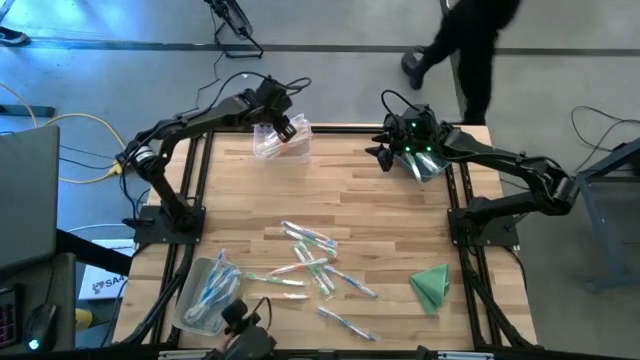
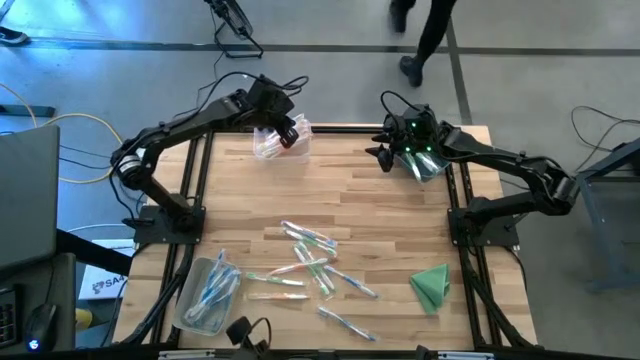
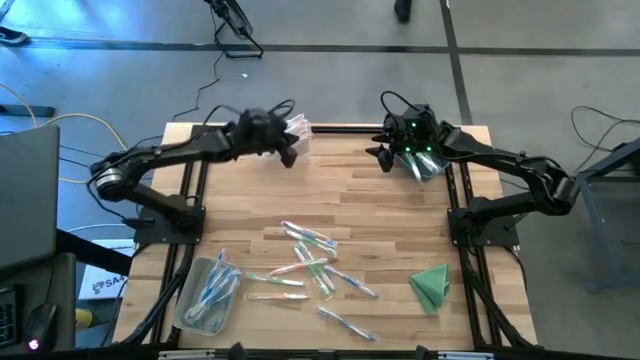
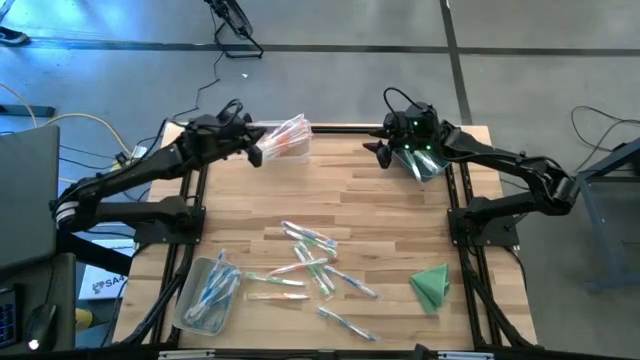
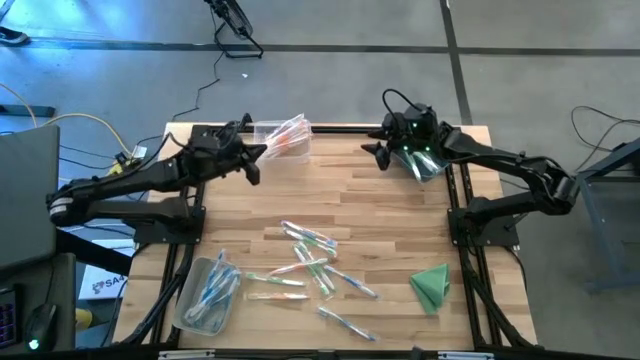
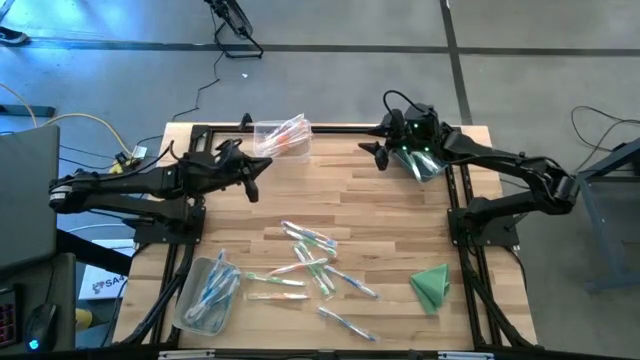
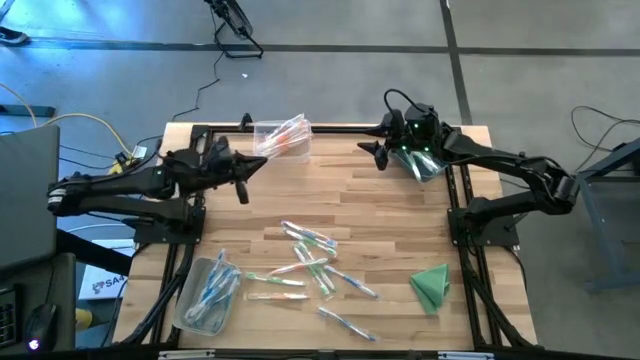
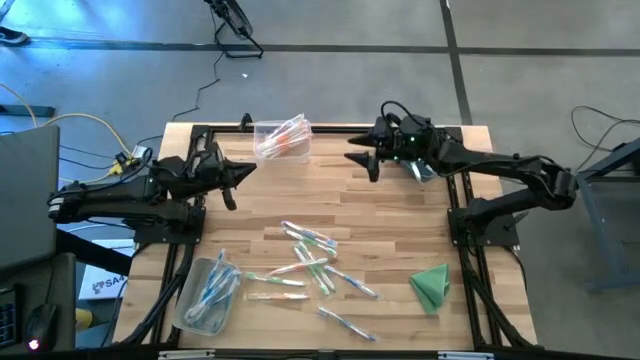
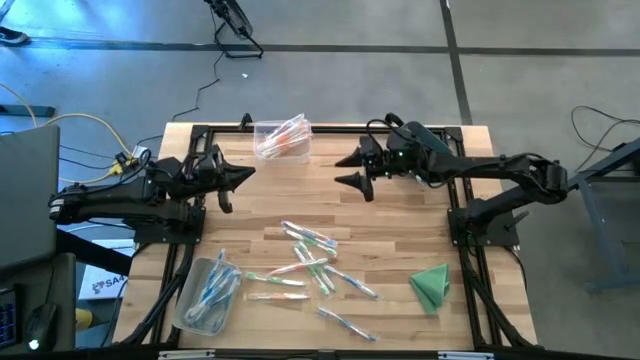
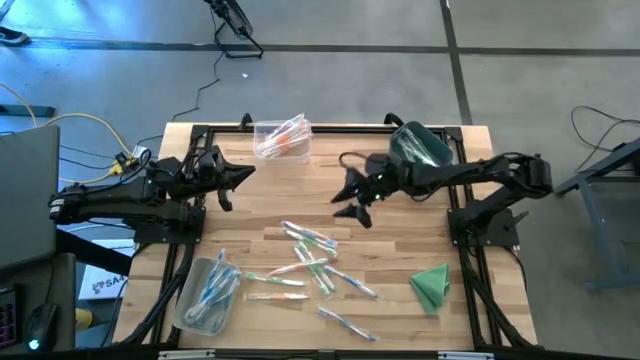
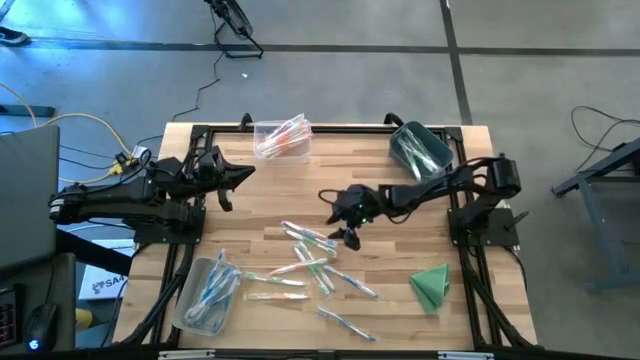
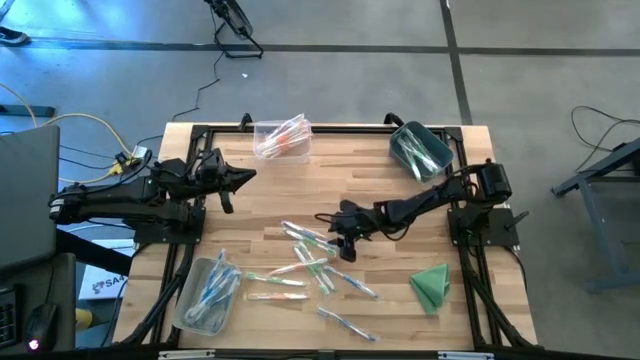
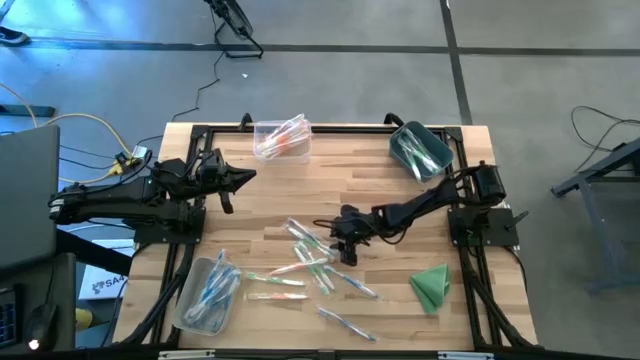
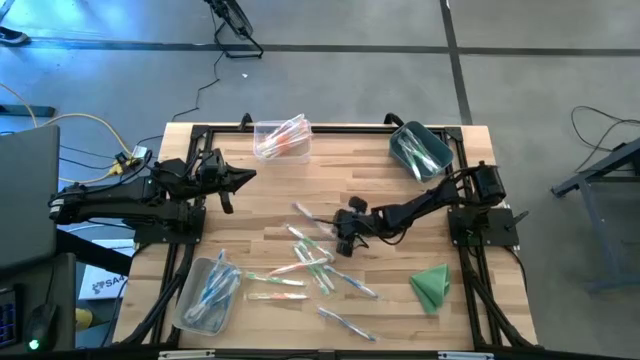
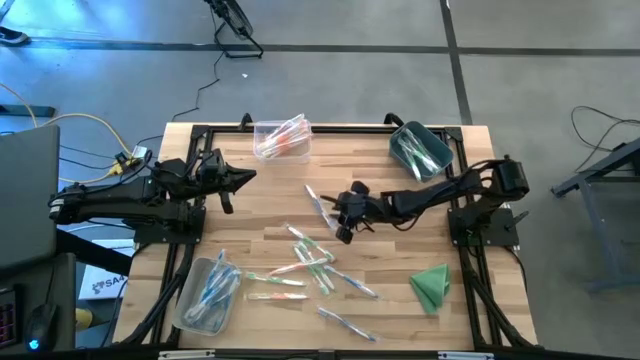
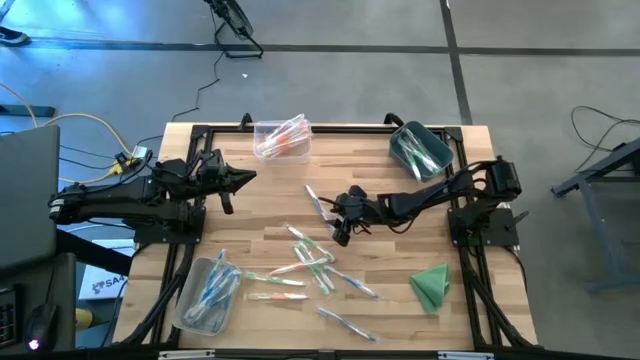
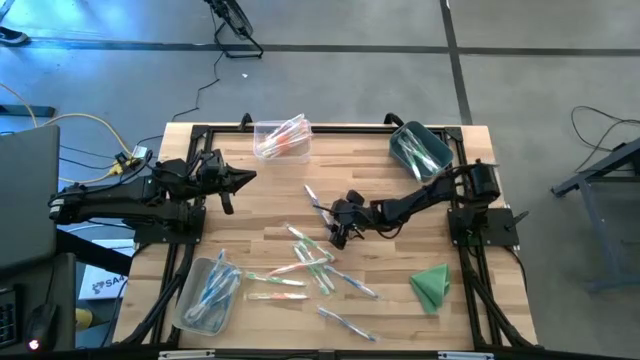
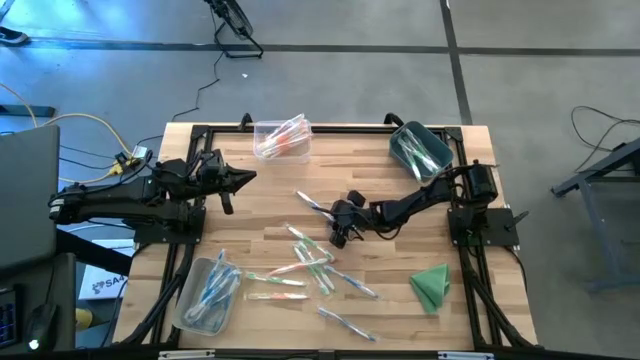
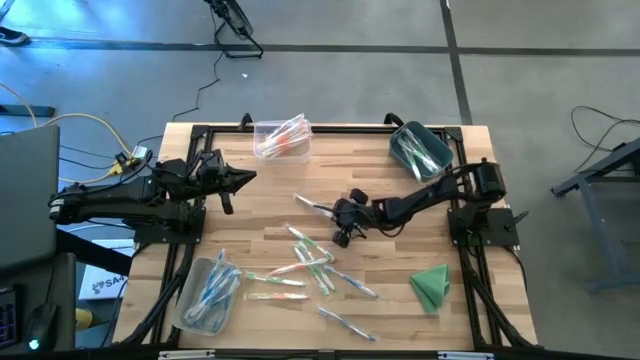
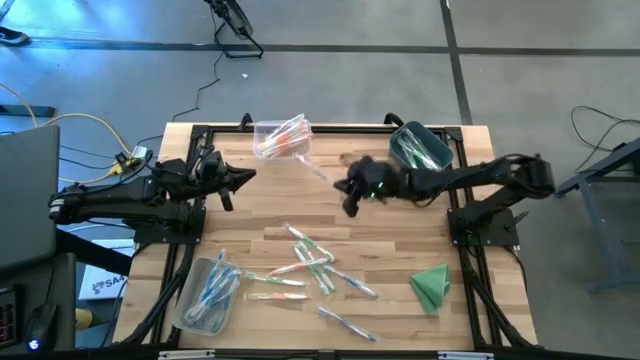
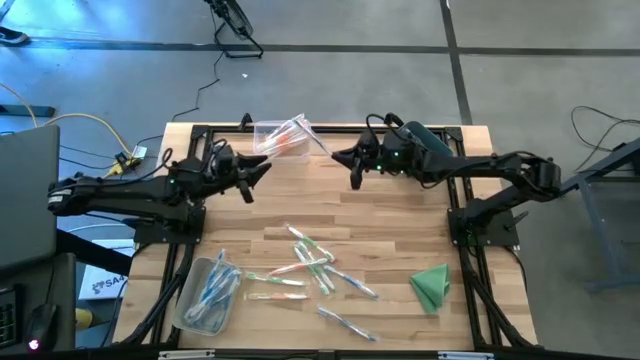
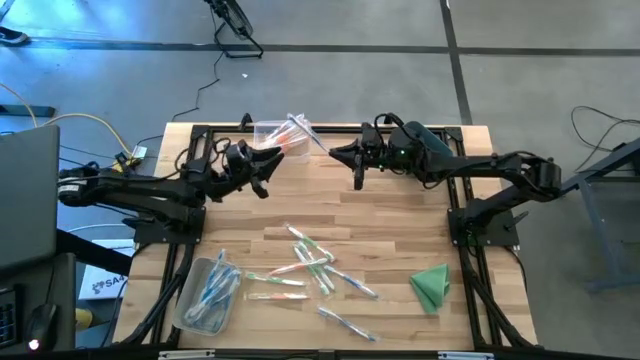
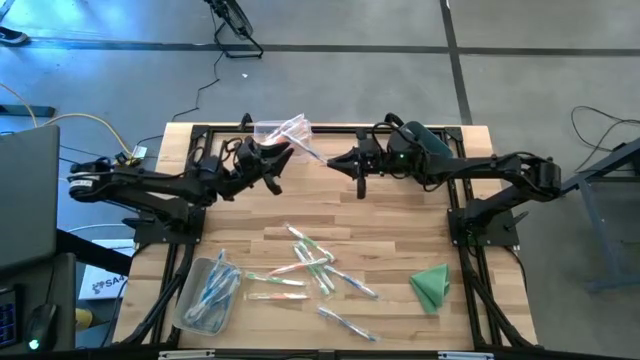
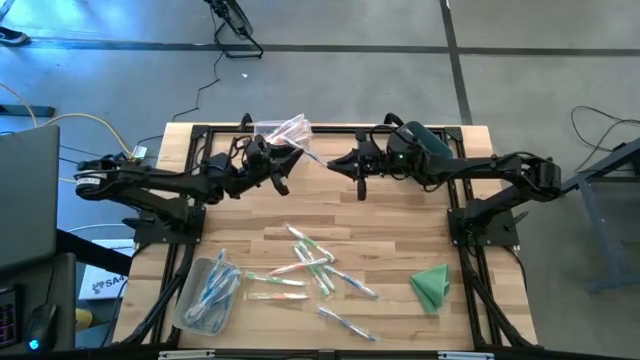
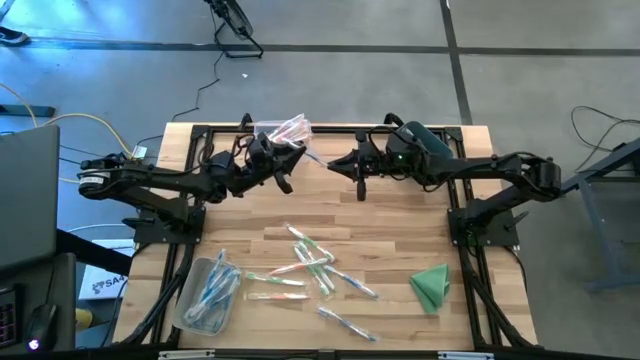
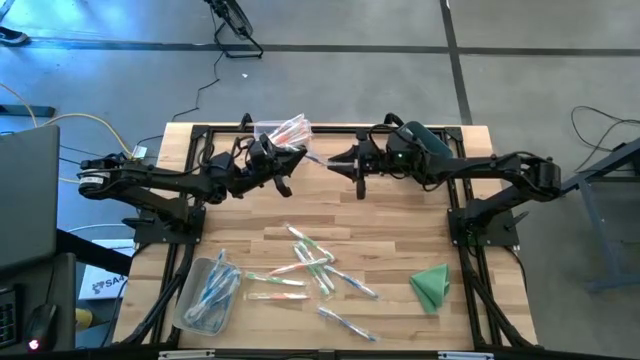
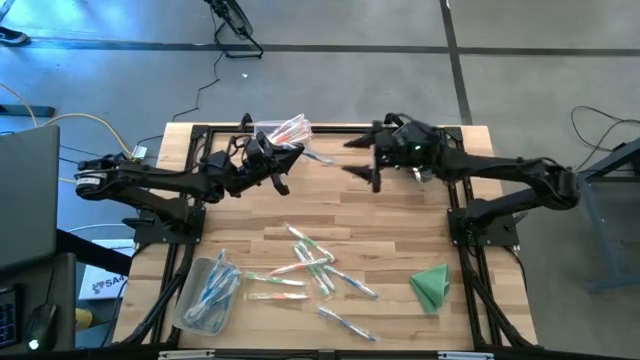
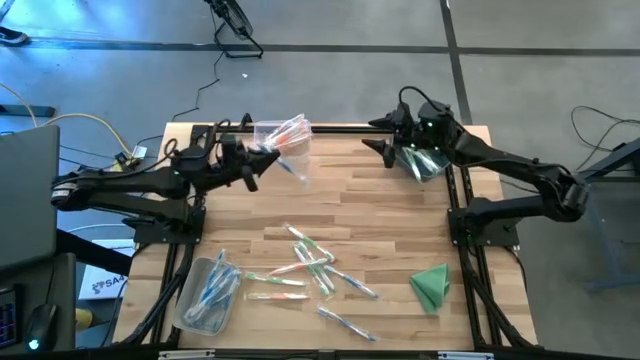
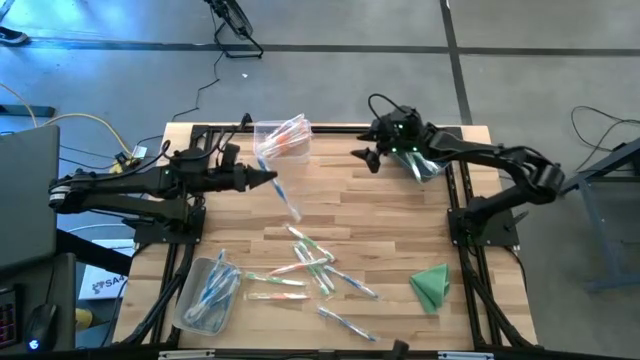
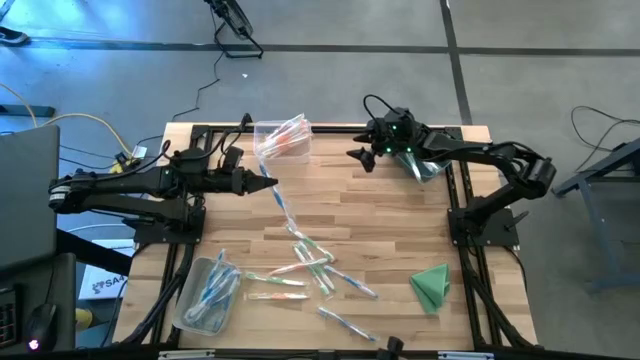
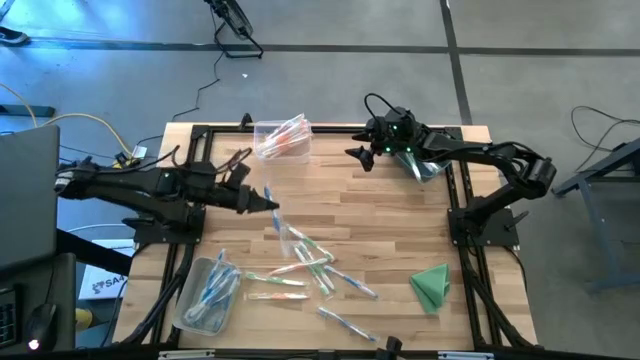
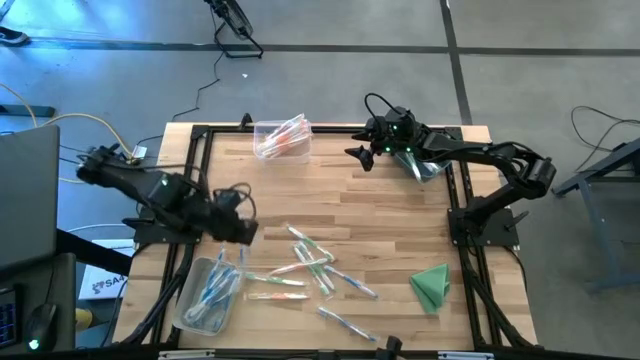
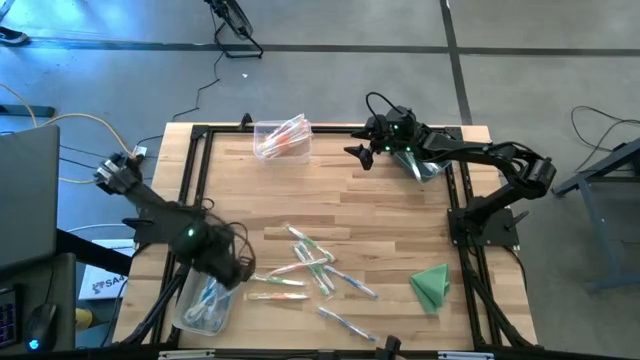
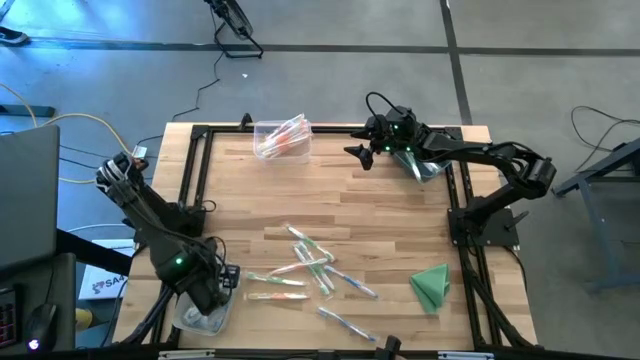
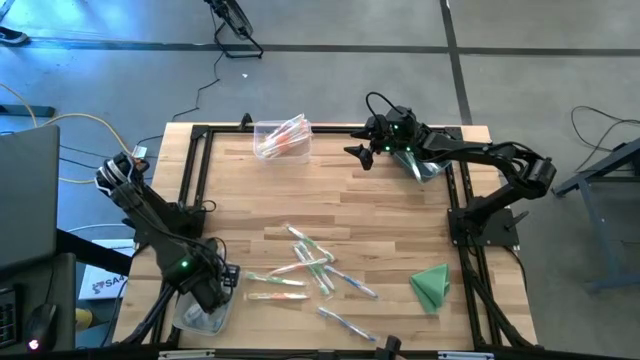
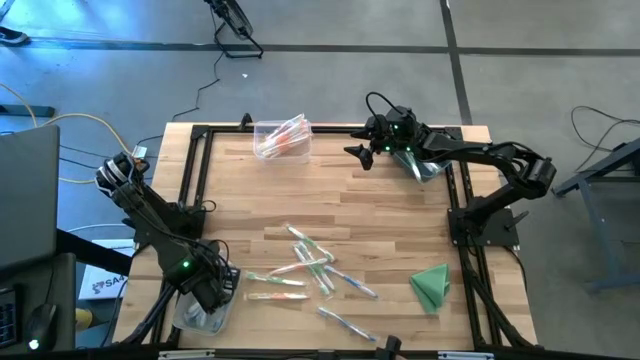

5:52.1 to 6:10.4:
Task: Pick & Place Toothbrushes
Put the top blue toothbrush into the gray bin
